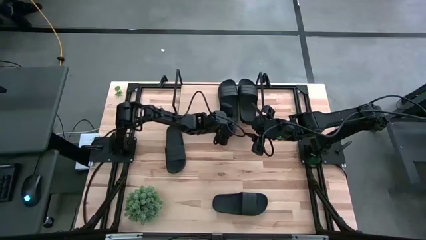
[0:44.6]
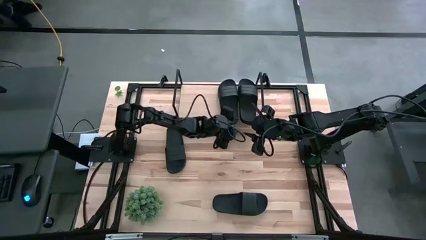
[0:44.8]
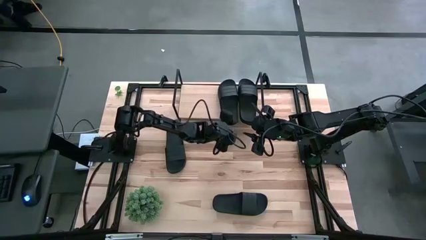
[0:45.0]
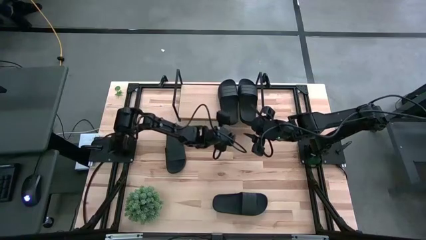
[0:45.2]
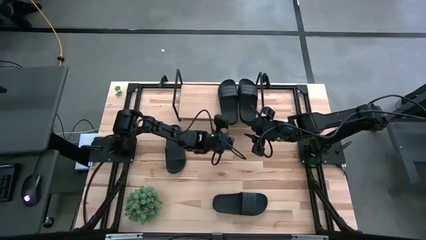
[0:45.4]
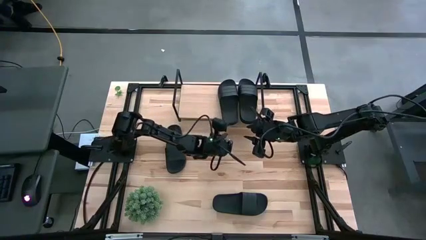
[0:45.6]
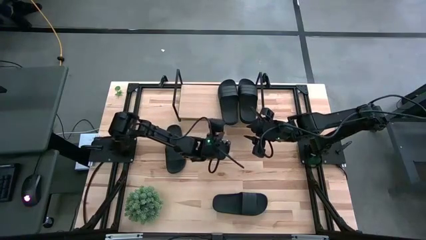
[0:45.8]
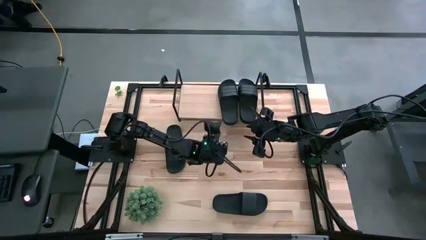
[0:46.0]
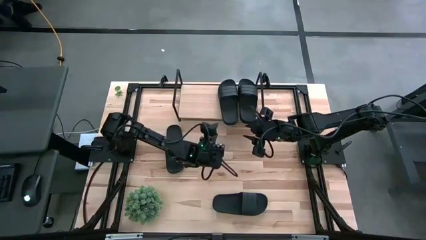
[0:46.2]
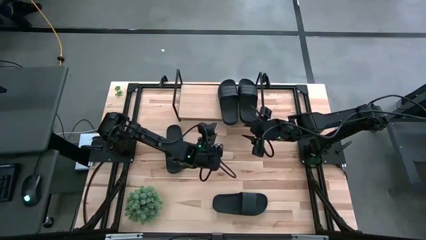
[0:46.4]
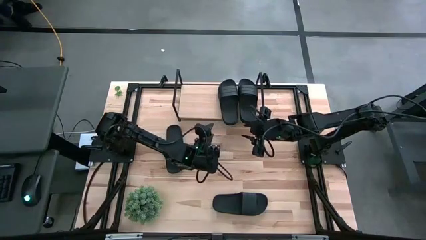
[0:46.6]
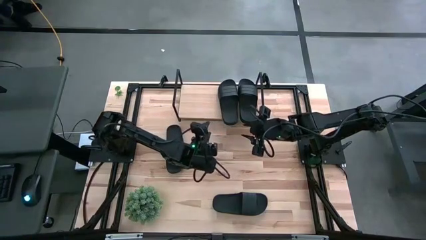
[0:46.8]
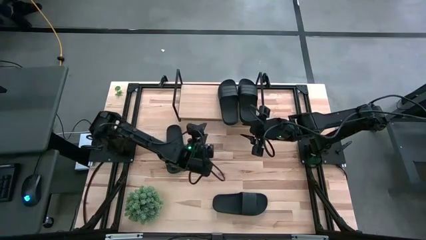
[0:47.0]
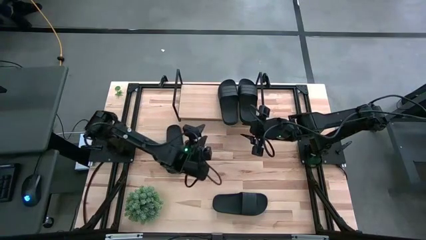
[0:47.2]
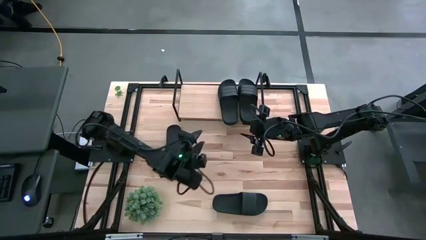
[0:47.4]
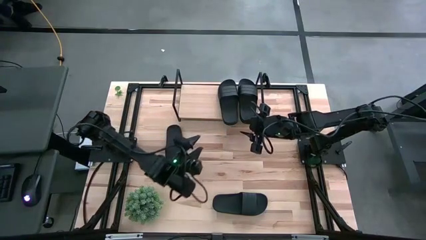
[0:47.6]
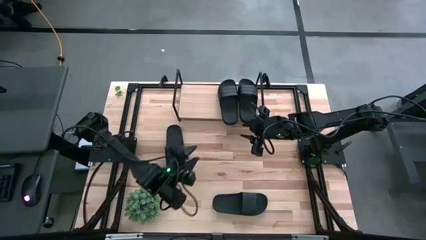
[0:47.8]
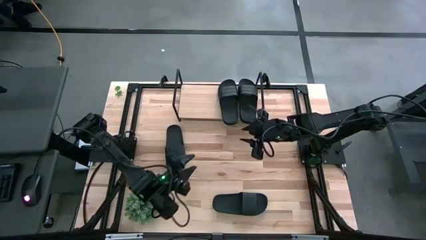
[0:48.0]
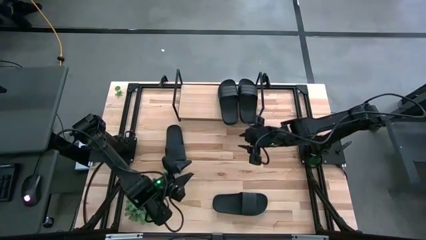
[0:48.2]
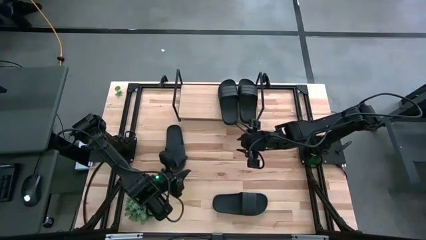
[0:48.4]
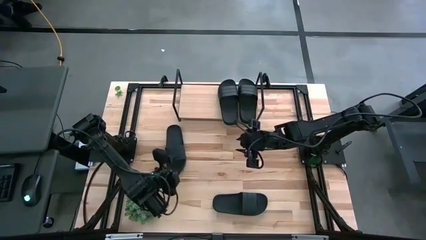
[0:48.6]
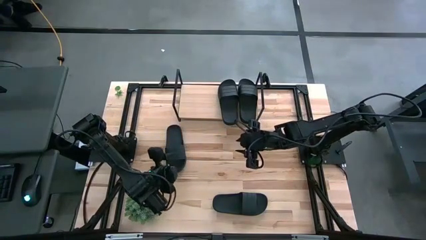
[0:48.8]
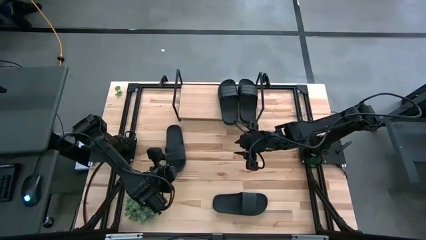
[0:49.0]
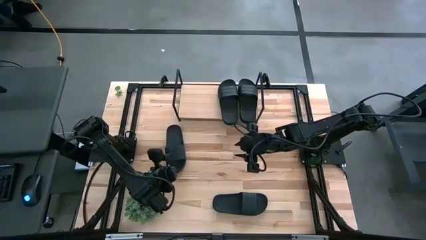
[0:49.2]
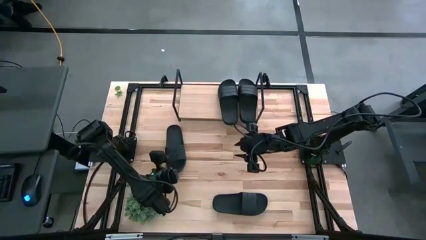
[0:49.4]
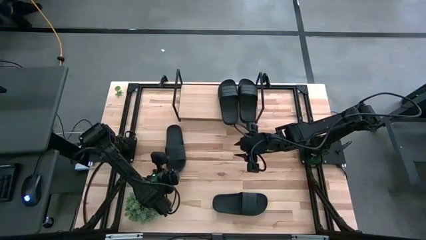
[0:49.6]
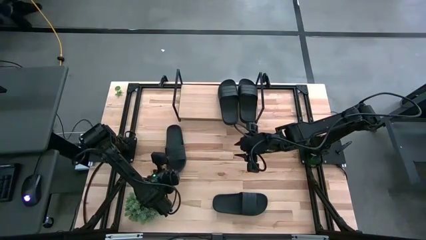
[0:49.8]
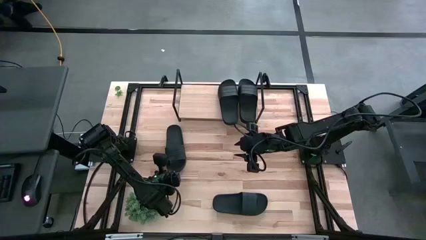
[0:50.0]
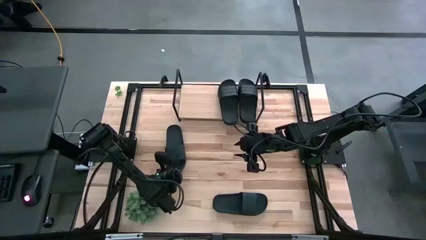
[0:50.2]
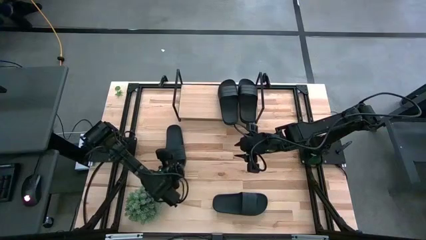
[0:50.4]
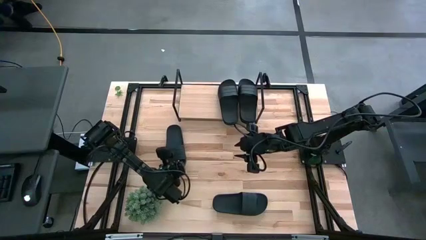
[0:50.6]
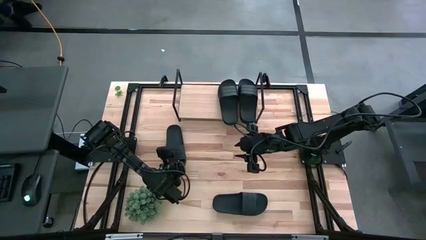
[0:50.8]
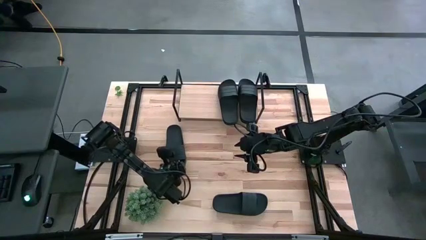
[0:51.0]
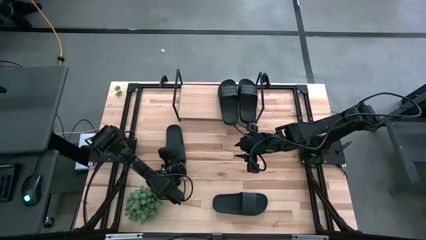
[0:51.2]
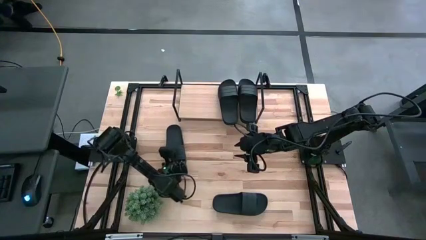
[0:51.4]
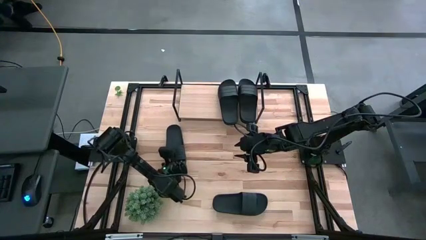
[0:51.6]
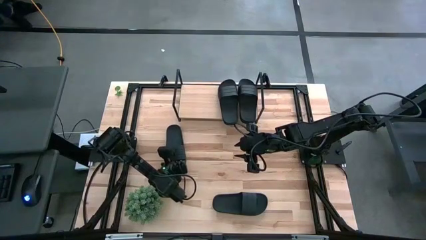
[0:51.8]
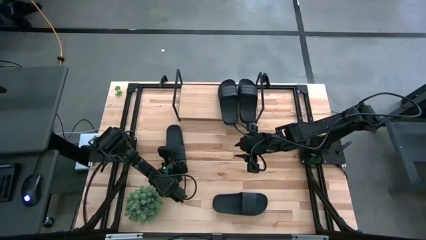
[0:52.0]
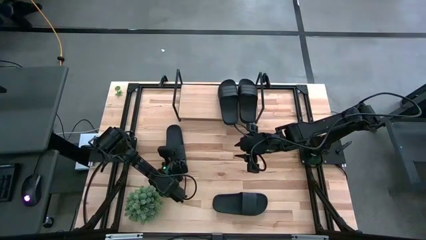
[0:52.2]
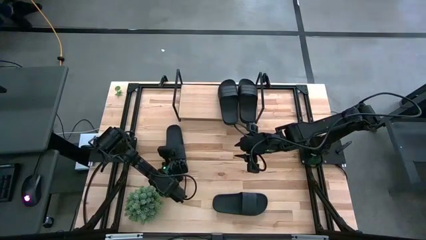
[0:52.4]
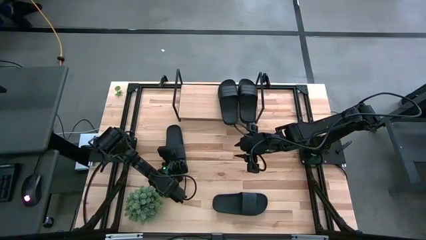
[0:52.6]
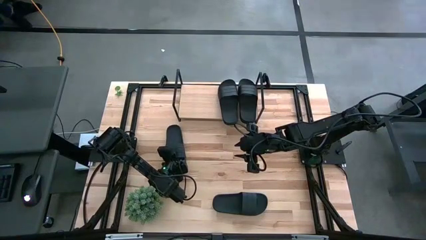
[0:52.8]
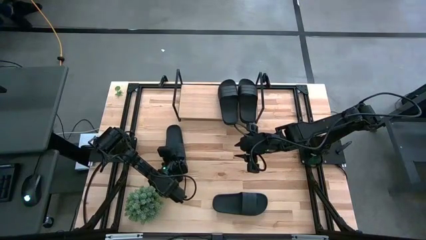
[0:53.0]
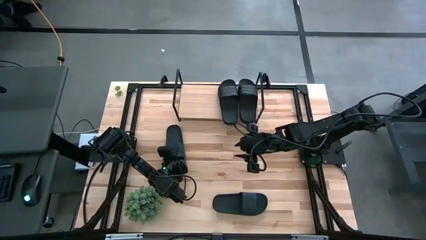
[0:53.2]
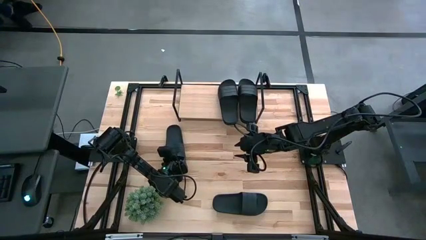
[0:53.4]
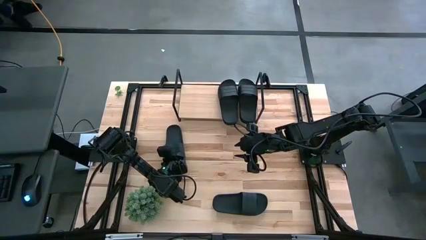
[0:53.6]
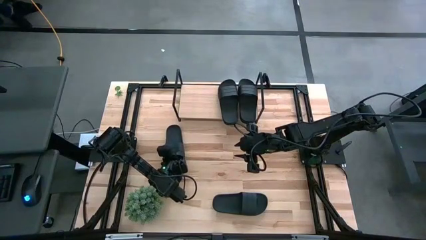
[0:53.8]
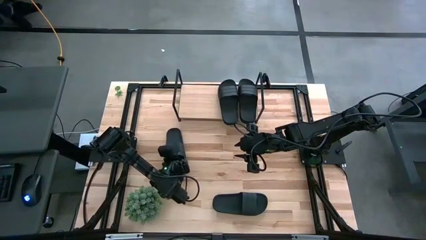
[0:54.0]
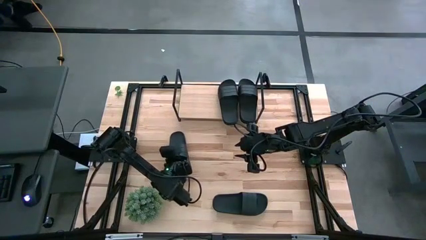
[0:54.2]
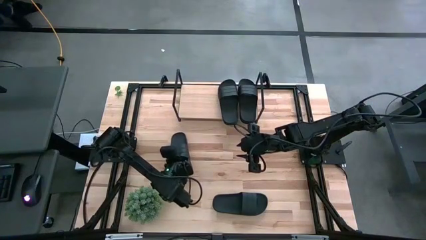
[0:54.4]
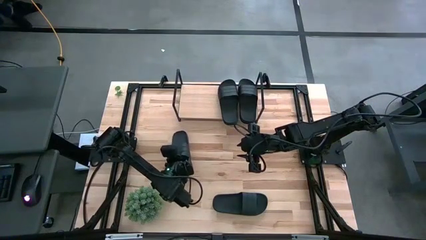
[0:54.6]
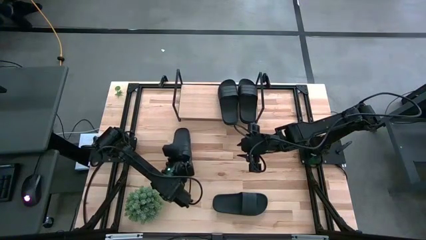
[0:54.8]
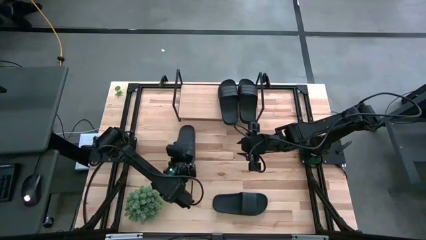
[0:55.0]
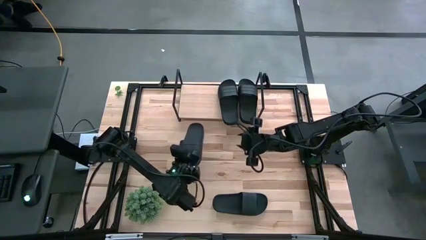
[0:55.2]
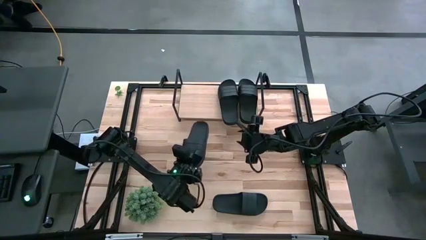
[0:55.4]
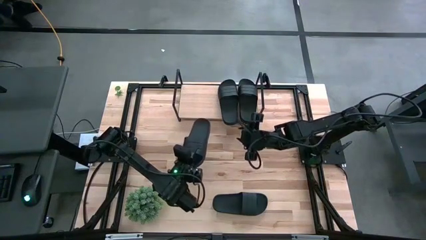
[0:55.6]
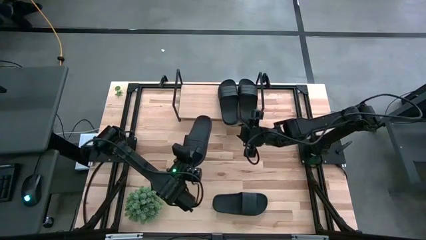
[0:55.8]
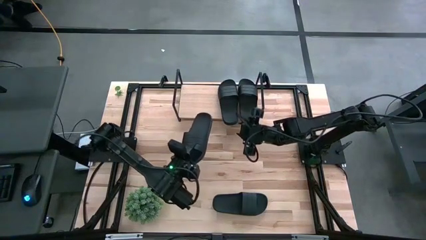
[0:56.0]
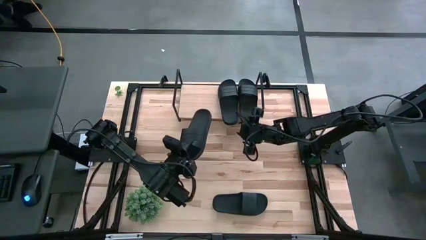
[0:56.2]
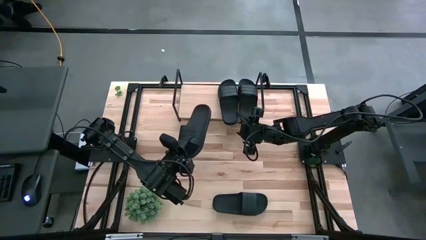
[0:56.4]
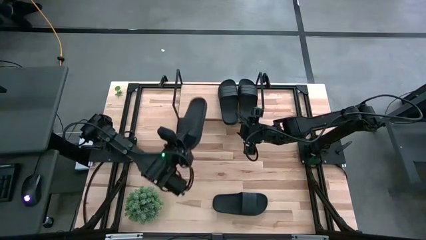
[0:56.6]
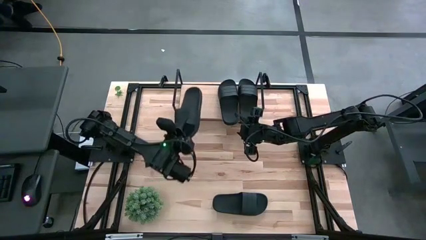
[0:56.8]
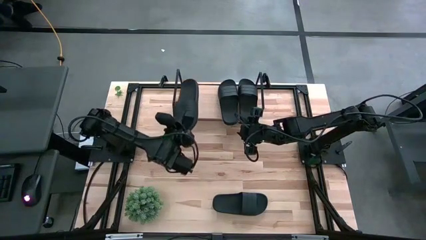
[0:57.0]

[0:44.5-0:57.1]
Task: Pick and place slides into the shelf
Put the left black slipper on the shelf

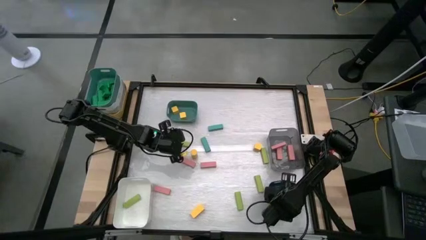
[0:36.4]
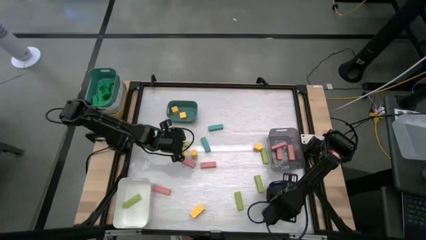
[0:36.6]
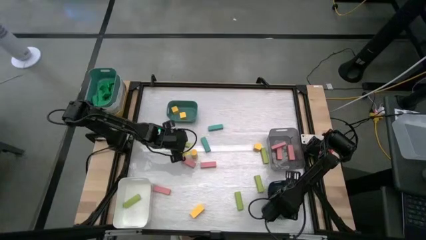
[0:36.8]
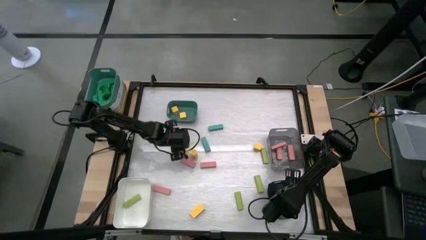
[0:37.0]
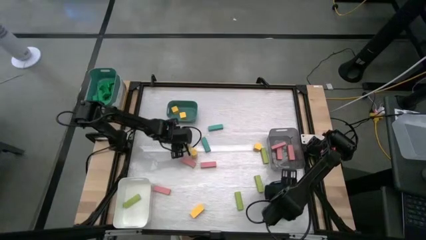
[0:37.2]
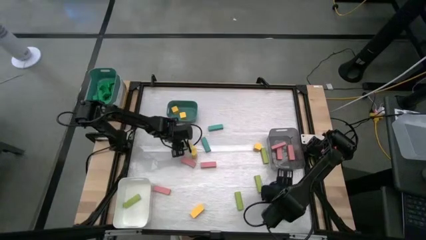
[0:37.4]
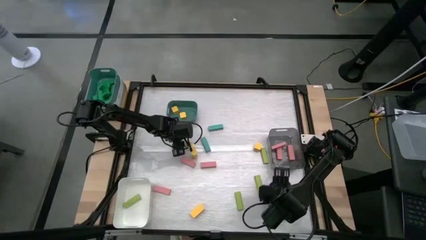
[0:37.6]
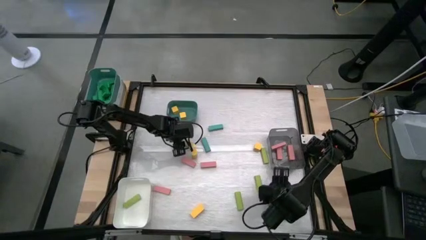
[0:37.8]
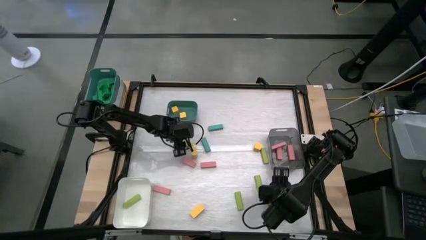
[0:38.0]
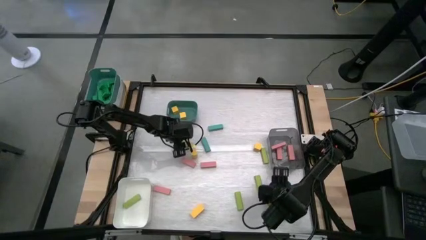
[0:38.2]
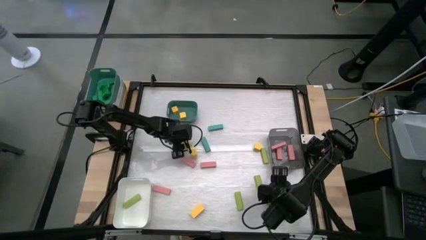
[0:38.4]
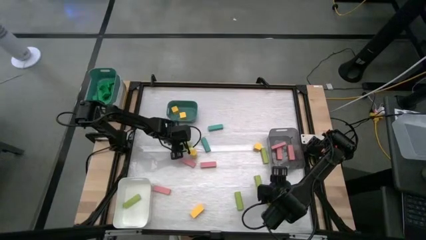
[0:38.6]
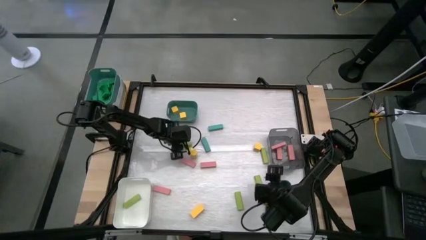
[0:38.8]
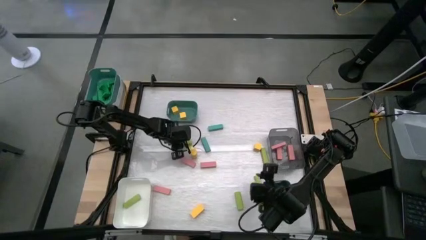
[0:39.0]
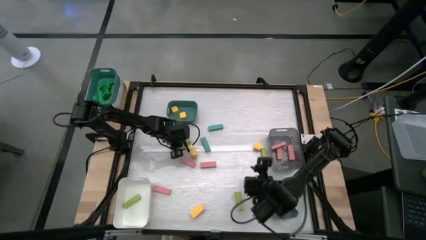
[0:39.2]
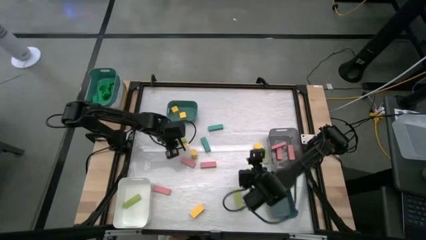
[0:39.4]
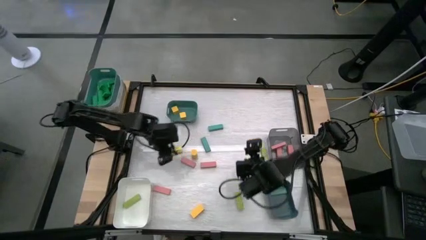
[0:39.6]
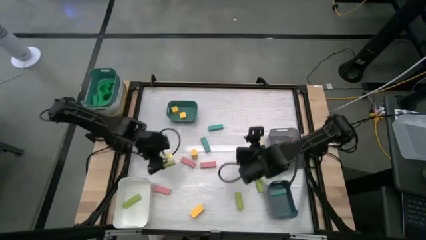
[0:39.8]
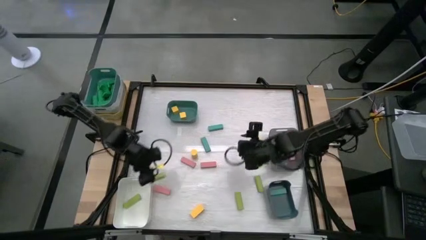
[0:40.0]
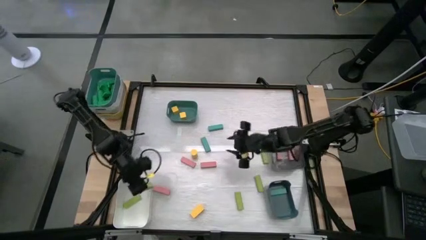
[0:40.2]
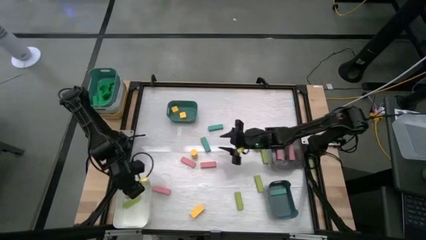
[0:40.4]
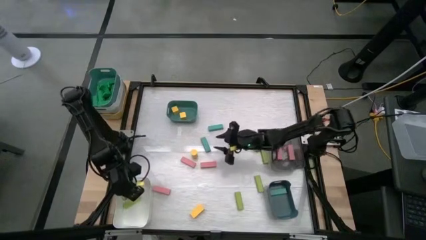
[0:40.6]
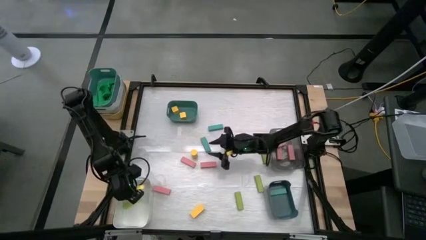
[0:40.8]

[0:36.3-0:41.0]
Task: Sort blocks
Put the green block into the white bin
